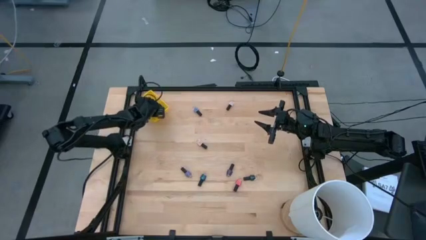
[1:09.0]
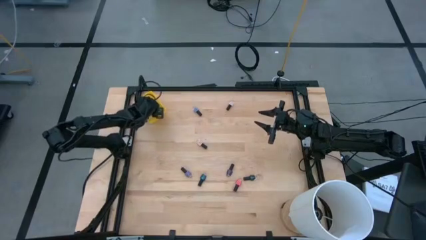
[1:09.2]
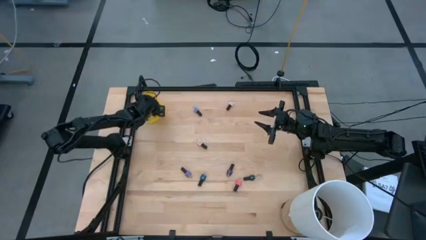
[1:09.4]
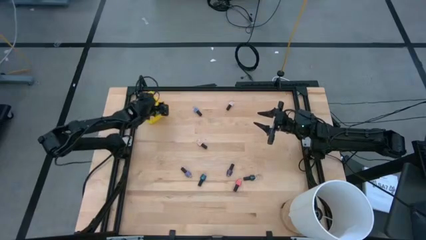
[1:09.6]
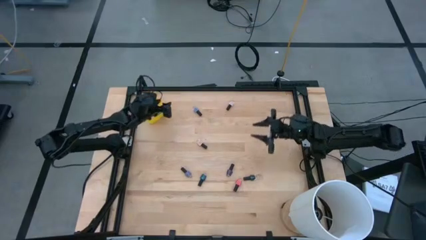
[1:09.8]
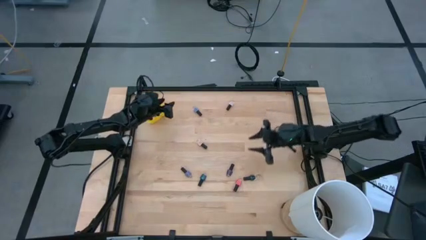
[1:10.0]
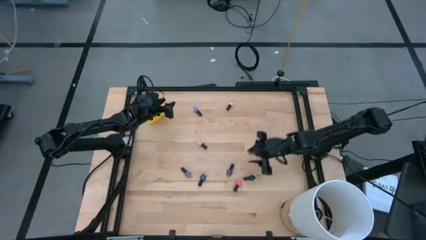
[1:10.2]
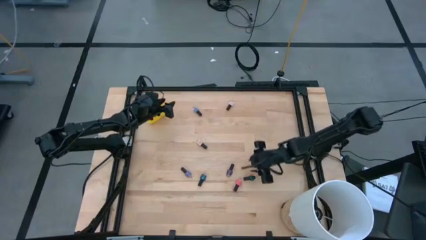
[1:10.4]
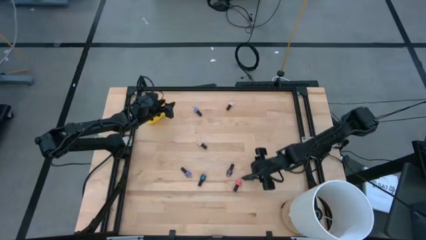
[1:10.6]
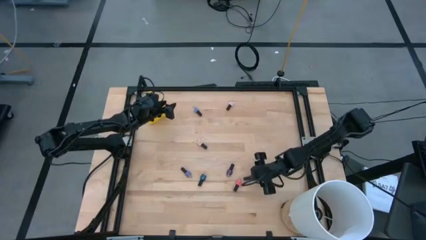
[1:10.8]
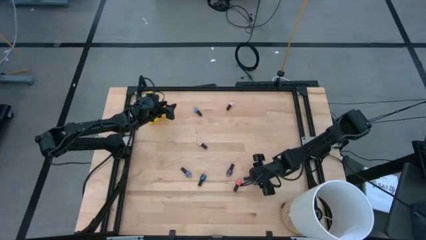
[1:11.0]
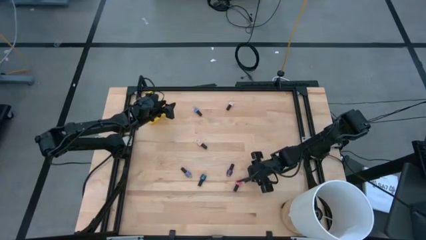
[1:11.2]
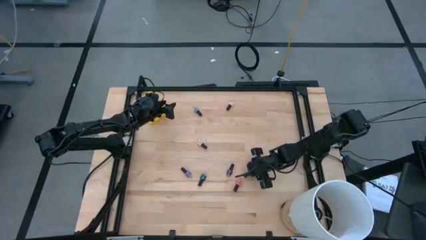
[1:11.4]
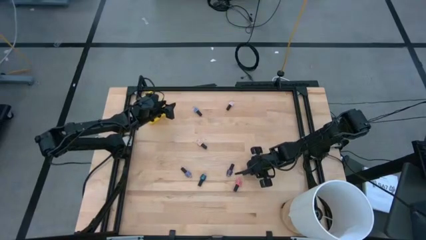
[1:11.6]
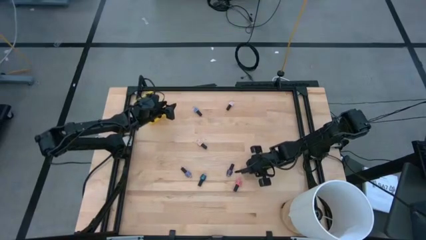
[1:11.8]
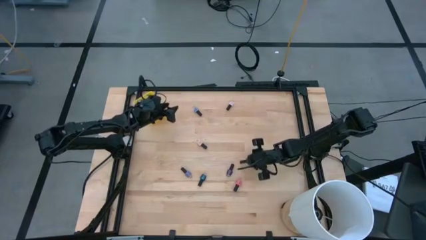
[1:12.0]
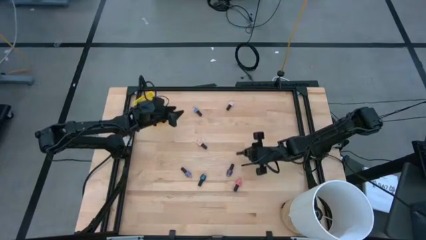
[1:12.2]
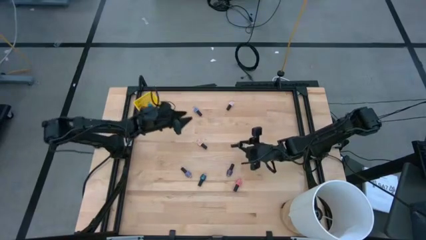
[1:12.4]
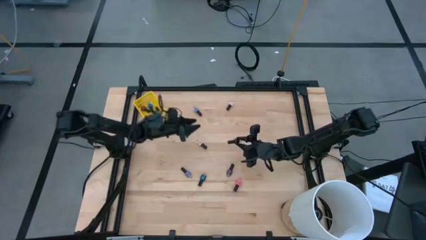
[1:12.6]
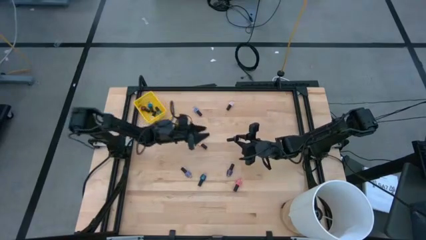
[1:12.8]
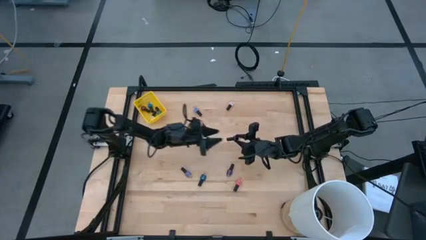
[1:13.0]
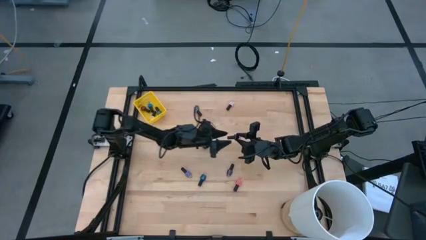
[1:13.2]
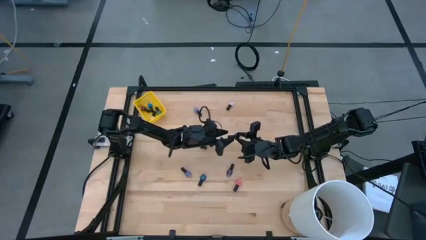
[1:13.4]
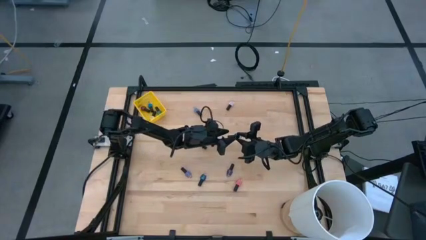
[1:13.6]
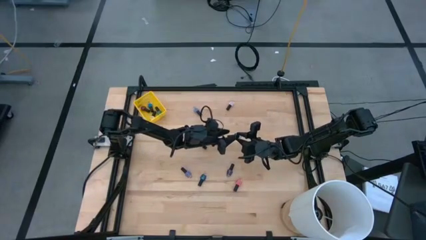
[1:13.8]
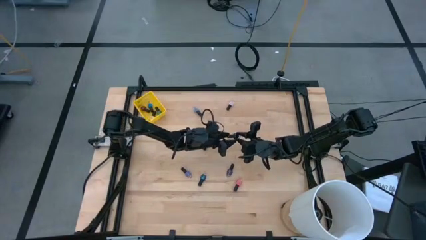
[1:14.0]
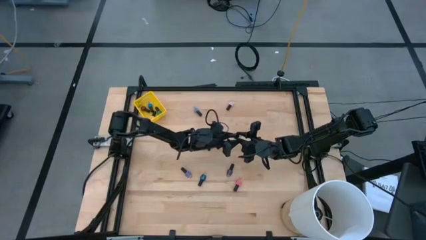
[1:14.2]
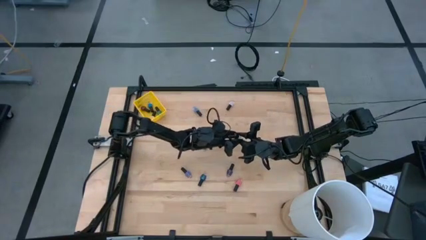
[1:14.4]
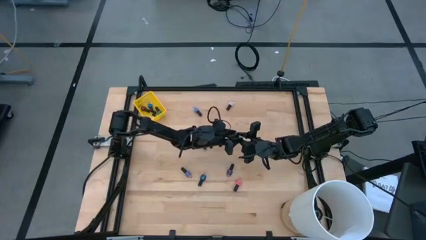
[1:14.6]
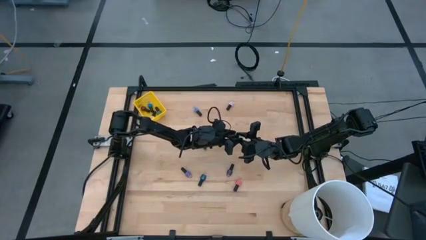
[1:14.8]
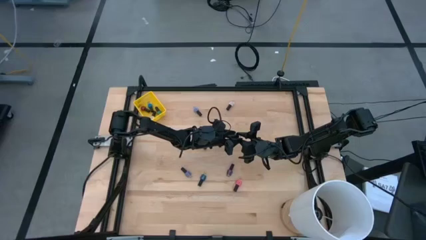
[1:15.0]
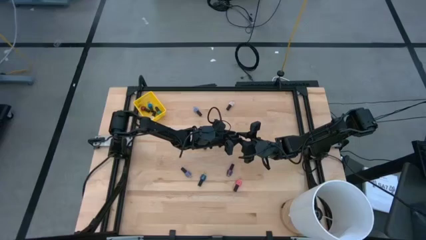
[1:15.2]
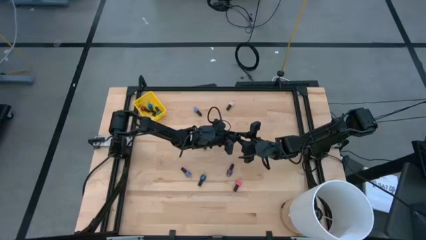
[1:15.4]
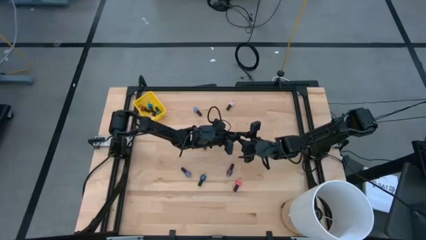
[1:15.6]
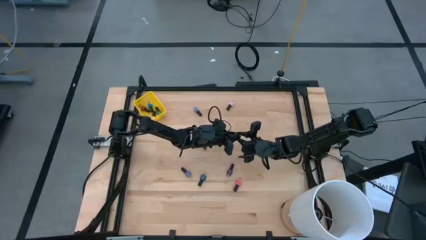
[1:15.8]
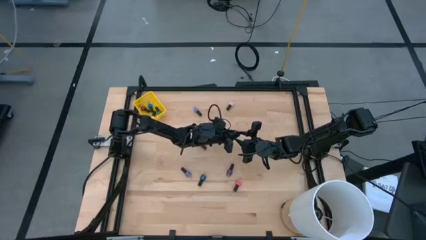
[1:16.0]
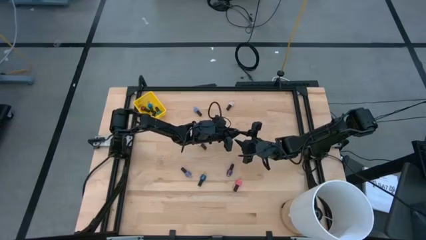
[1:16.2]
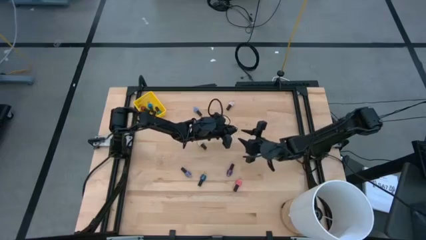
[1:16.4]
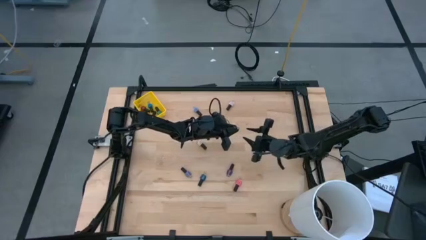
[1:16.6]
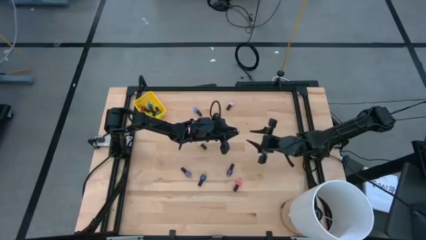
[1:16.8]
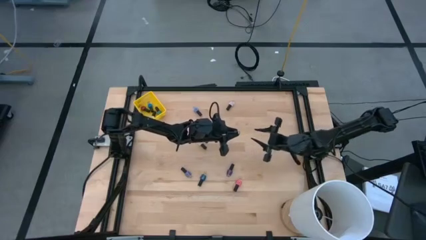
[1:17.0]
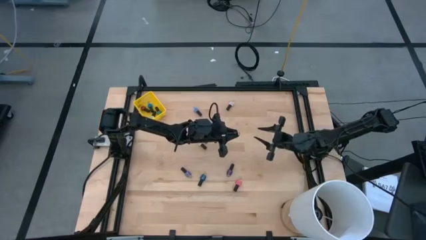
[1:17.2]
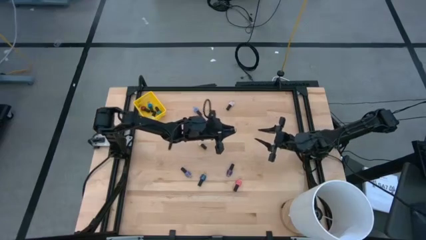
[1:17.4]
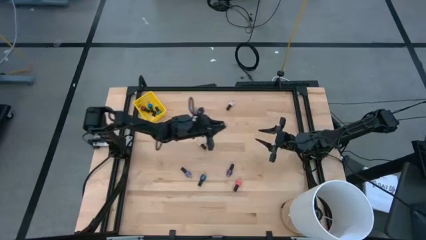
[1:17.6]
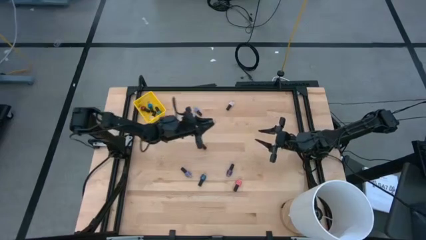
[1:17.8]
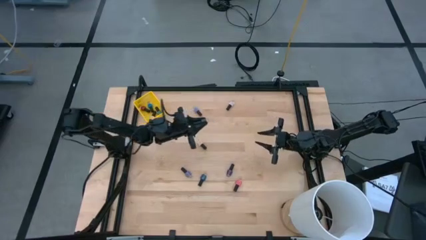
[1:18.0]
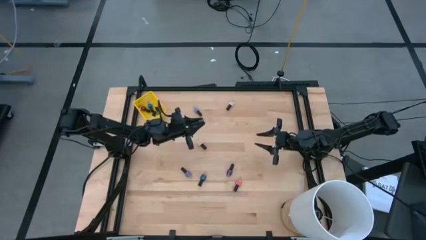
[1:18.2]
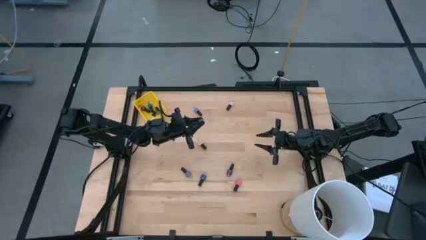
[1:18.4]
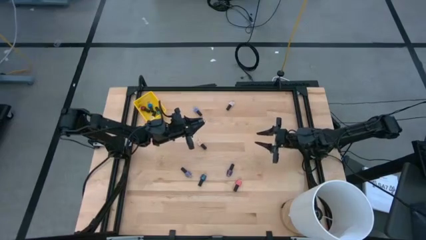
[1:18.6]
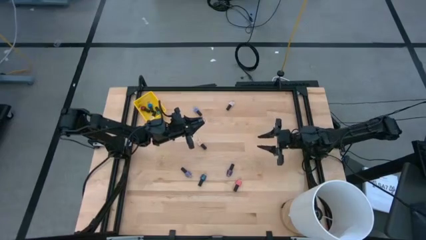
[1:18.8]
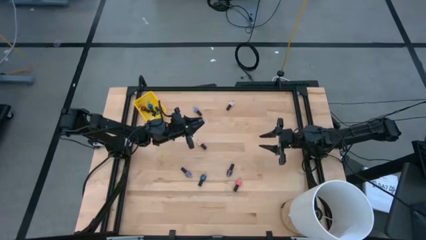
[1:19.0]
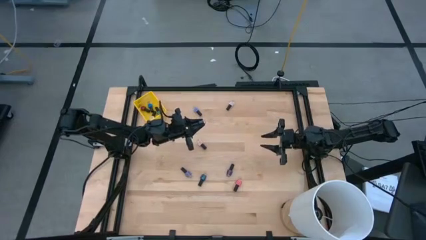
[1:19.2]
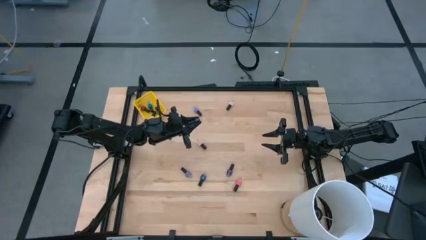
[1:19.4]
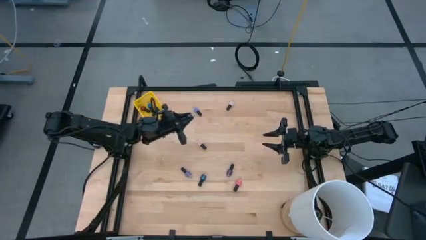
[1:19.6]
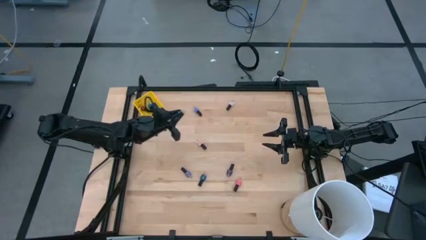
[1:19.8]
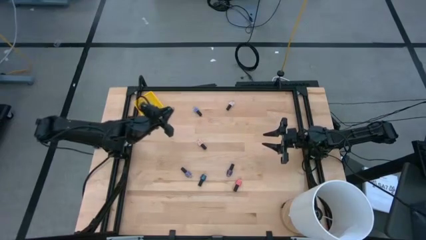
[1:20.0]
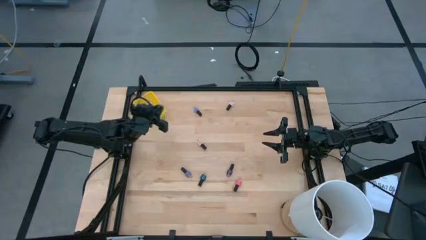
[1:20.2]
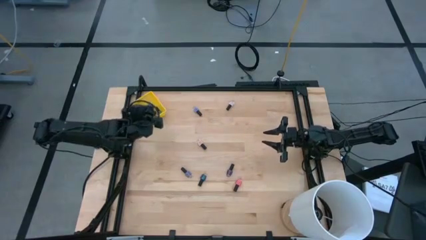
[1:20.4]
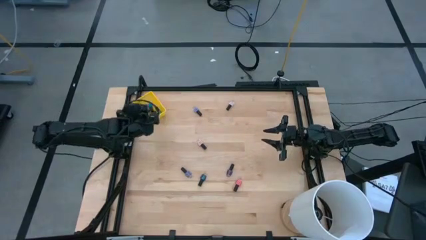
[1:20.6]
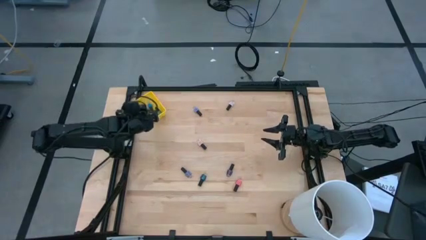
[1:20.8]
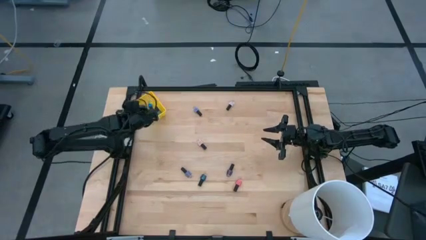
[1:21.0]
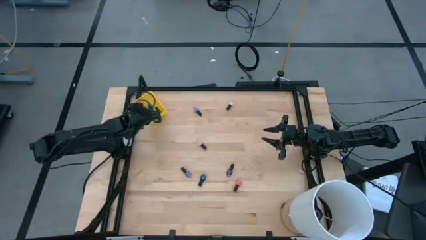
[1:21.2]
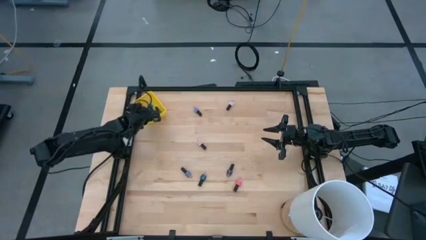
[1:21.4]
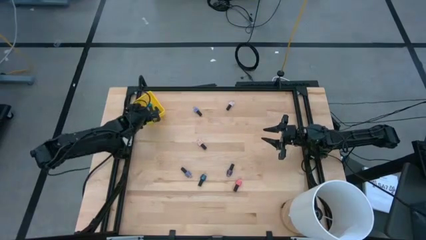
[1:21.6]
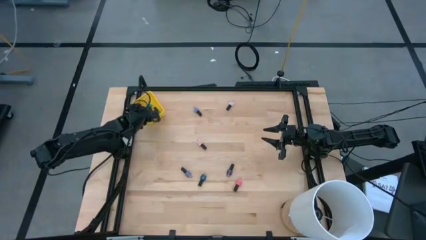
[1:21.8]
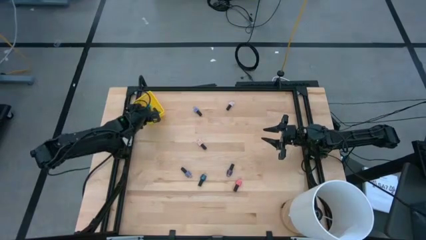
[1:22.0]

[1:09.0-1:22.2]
Task: Pick & Place Nail Polish
Put the dark green nail polish into the yellow bin

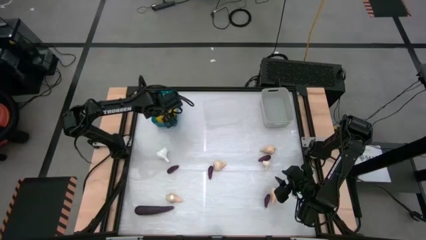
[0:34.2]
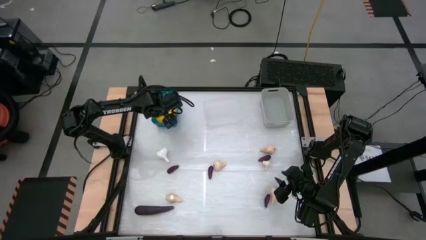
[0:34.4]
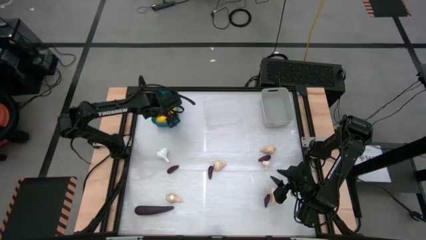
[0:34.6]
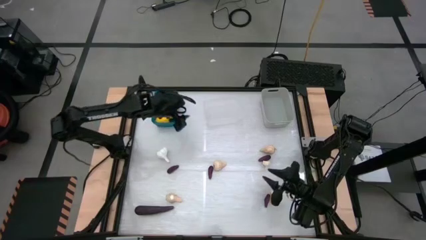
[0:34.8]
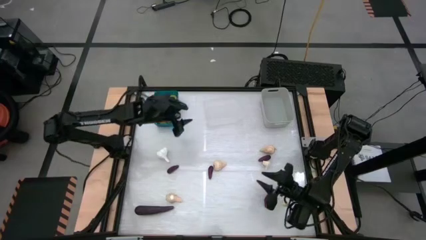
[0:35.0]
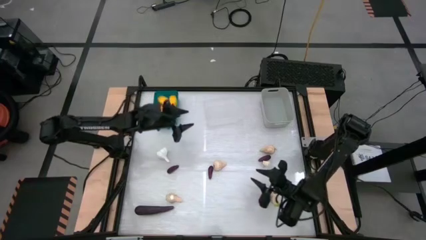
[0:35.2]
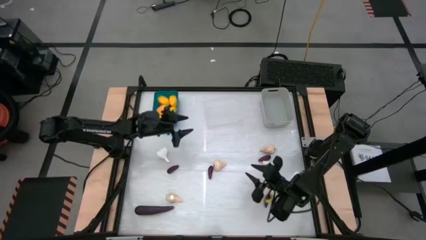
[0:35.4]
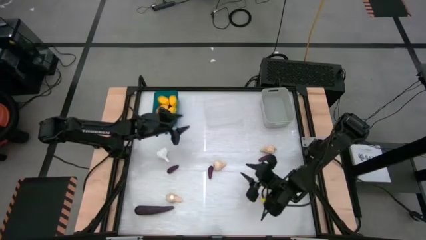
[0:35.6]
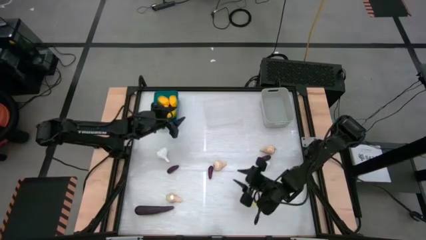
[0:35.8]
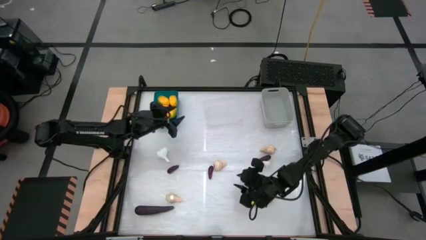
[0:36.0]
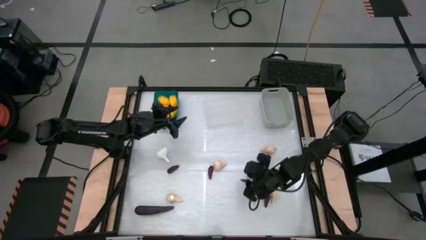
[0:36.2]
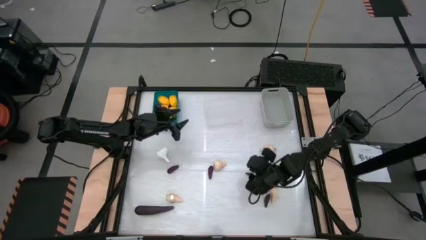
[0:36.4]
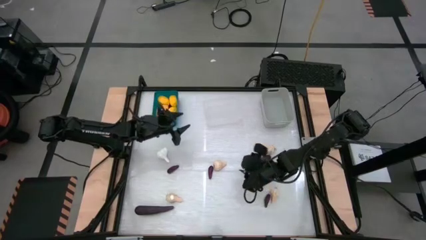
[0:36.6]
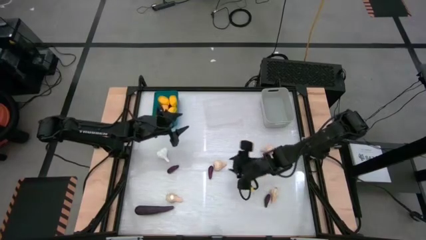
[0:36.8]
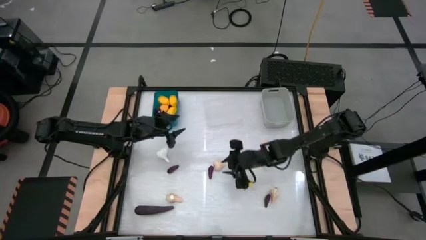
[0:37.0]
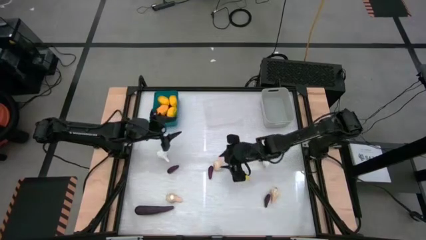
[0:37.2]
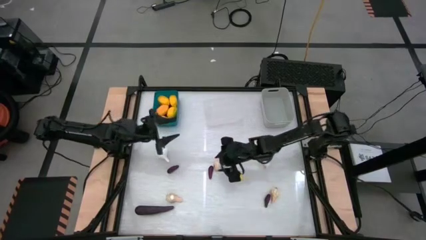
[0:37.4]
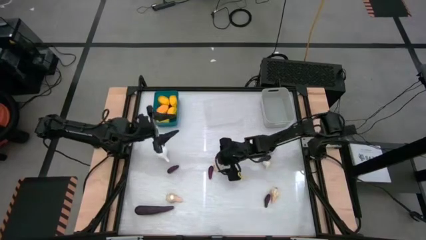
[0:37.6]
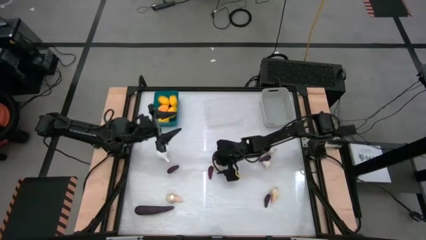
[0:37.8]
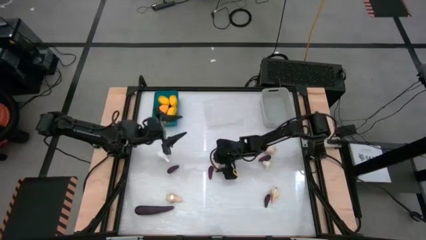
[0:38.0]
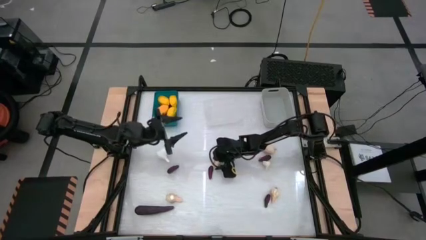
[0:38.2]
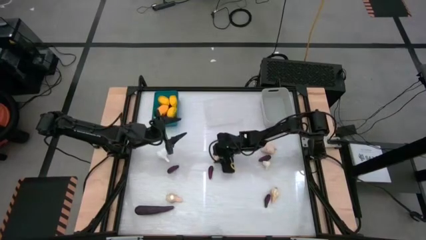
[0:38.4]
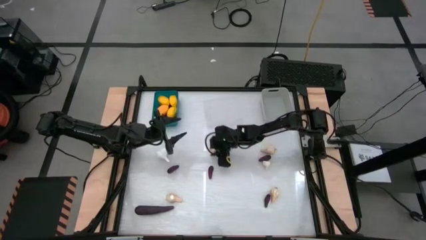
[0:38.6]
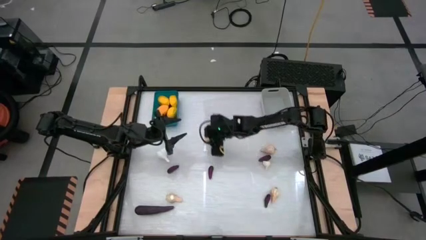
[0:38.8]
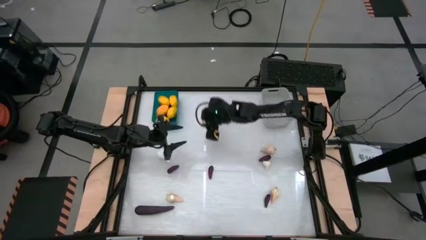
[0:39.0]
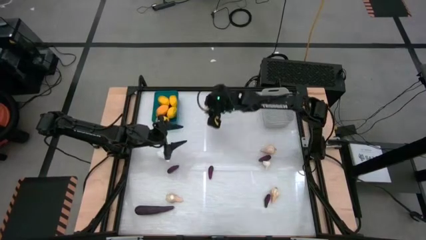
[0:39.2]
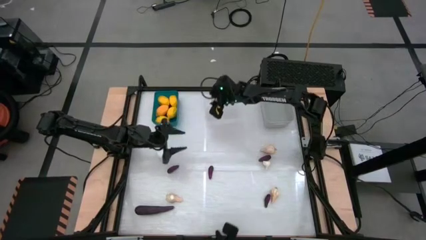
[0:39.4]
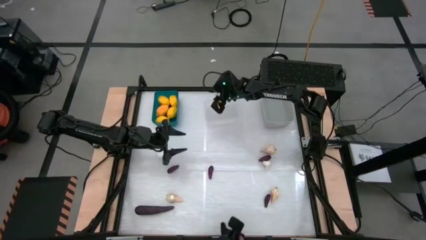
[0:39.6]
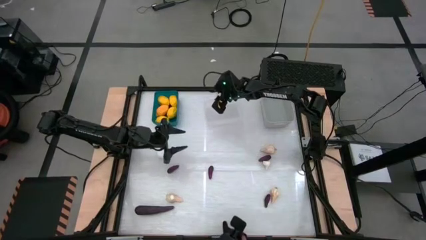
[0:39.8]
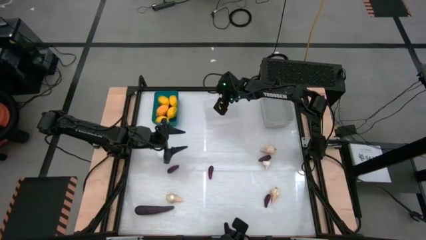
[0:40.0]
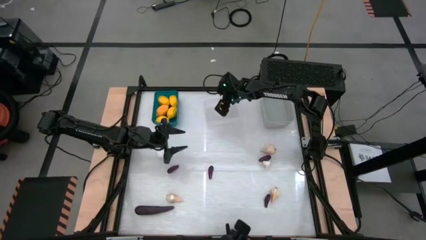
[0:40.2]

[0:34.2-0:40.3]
Task: Sort produce into baskets
Put the garlic into the transparent bin
